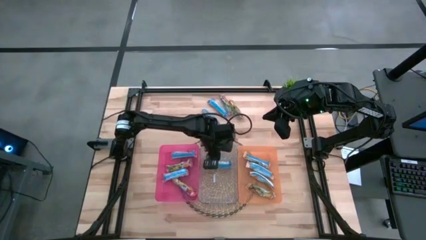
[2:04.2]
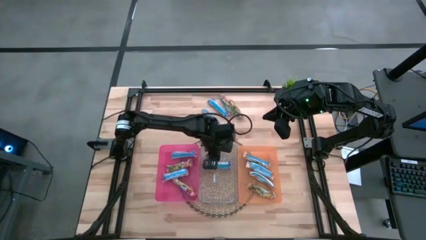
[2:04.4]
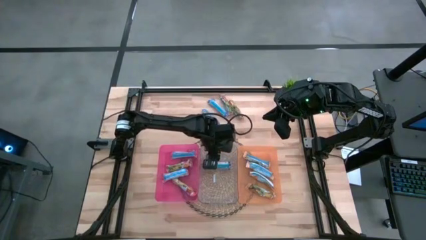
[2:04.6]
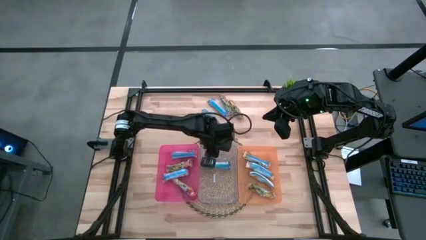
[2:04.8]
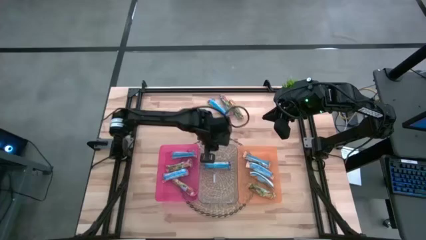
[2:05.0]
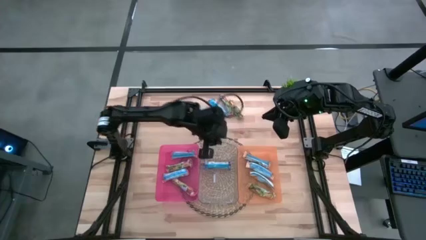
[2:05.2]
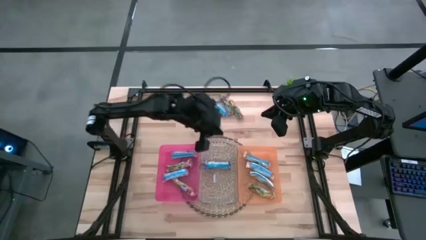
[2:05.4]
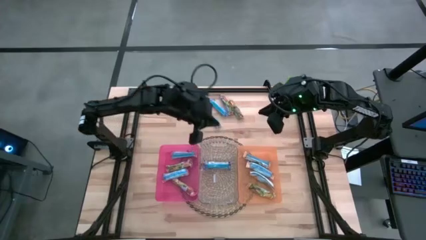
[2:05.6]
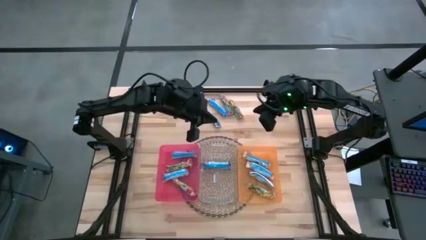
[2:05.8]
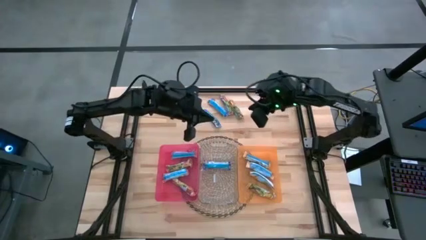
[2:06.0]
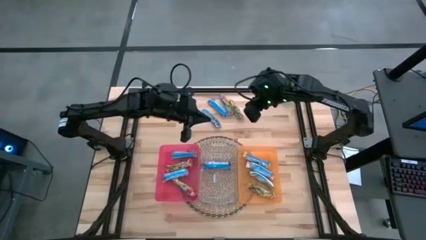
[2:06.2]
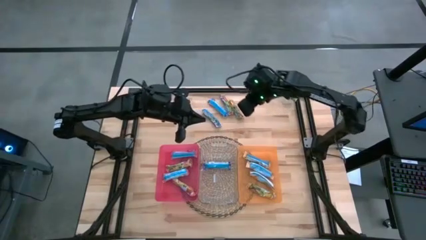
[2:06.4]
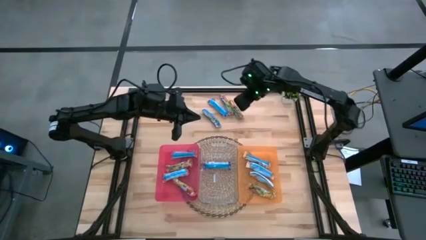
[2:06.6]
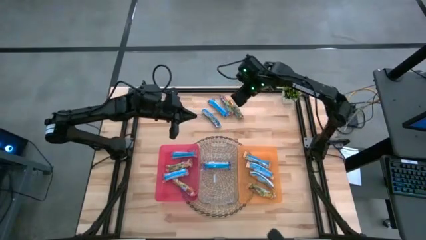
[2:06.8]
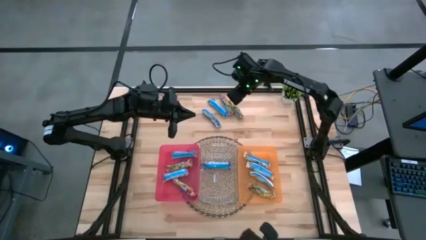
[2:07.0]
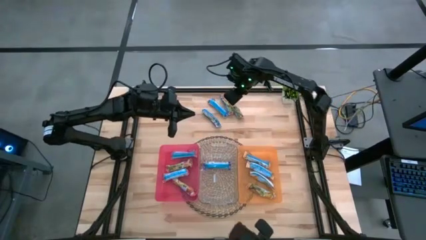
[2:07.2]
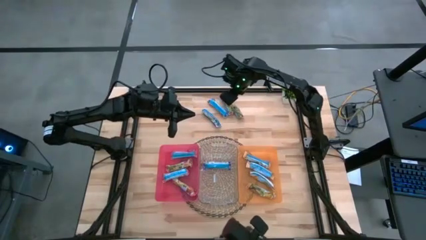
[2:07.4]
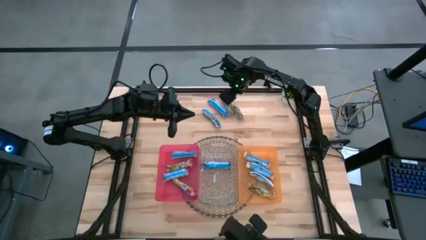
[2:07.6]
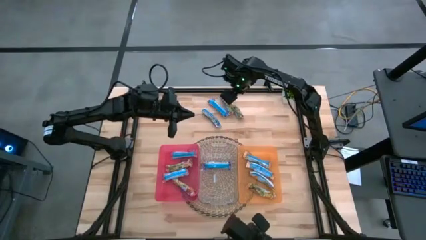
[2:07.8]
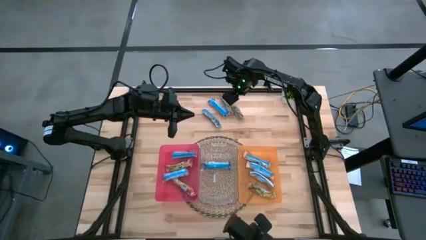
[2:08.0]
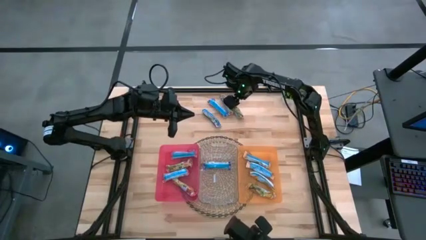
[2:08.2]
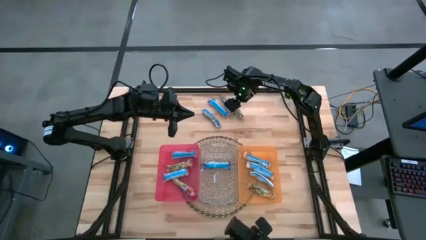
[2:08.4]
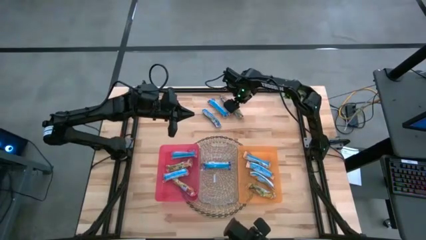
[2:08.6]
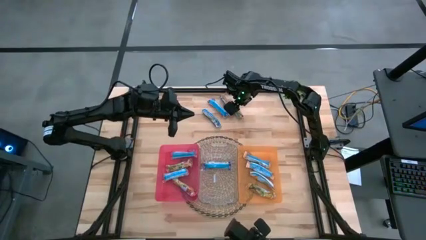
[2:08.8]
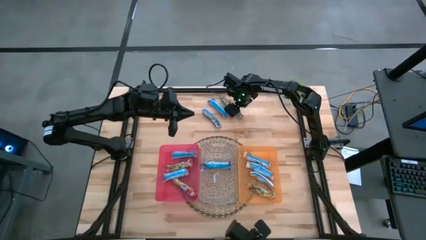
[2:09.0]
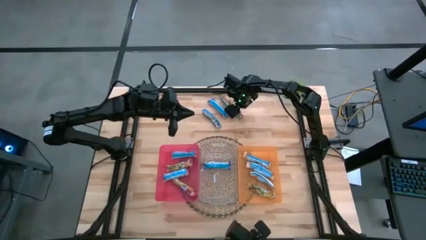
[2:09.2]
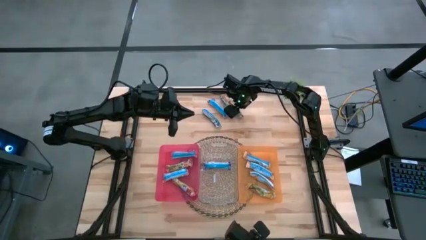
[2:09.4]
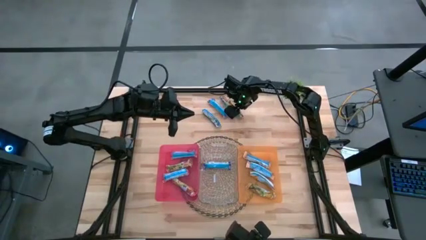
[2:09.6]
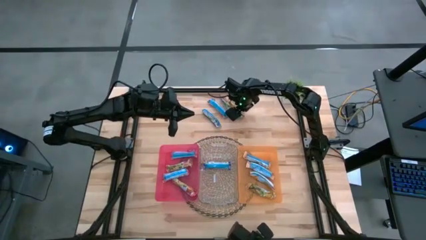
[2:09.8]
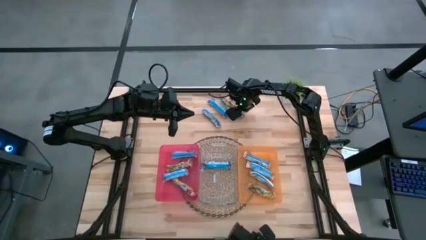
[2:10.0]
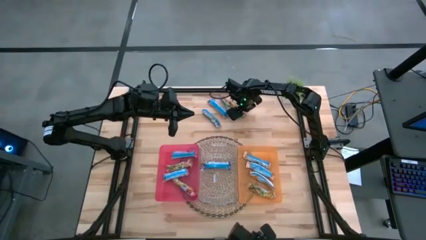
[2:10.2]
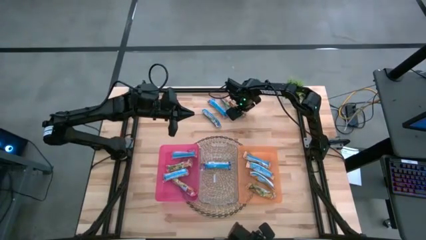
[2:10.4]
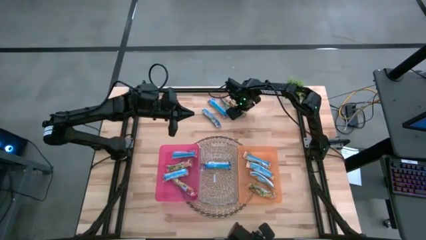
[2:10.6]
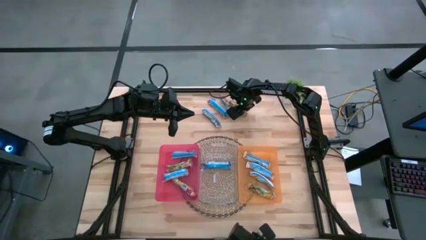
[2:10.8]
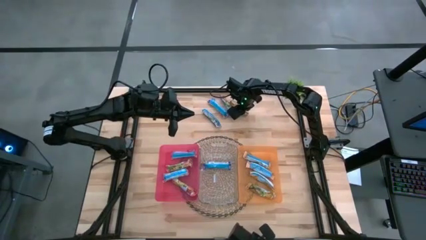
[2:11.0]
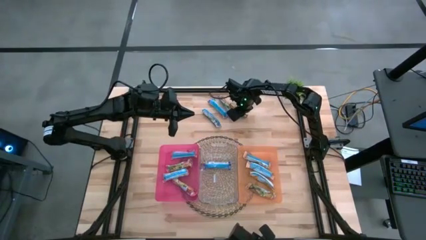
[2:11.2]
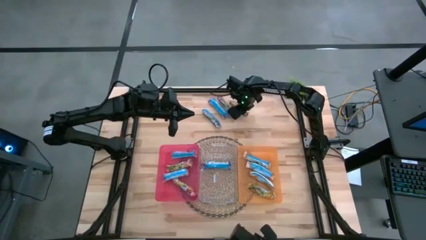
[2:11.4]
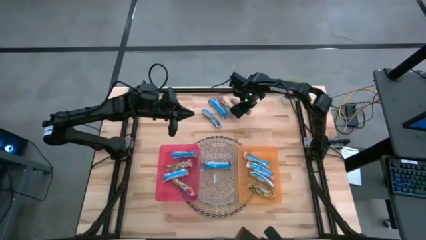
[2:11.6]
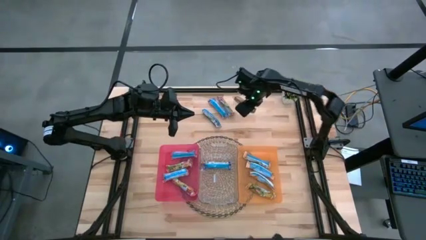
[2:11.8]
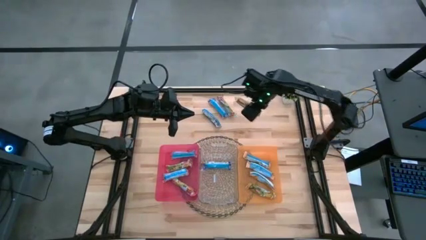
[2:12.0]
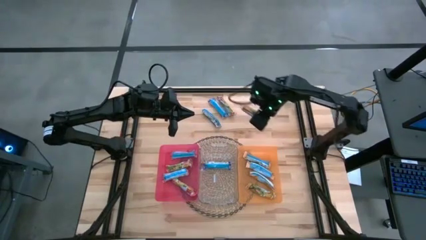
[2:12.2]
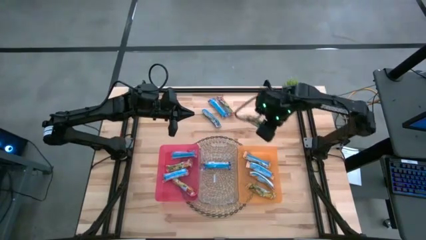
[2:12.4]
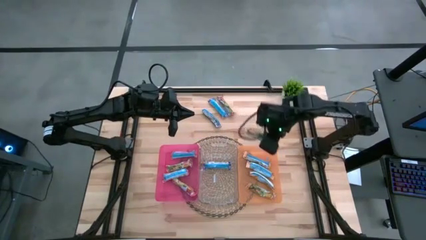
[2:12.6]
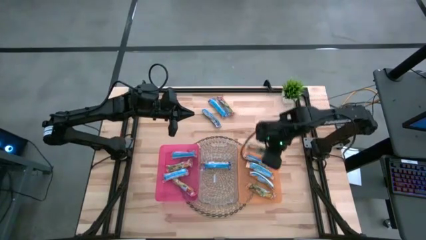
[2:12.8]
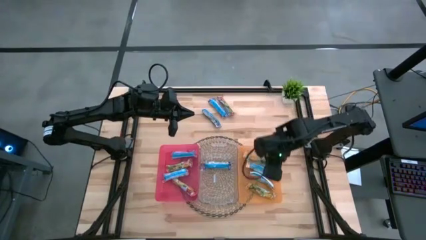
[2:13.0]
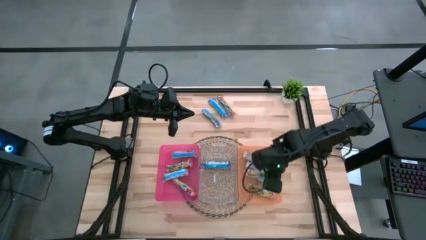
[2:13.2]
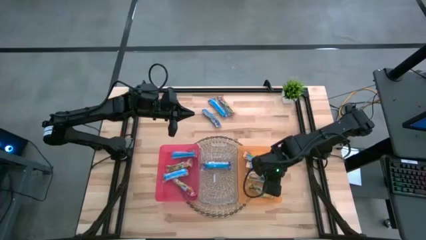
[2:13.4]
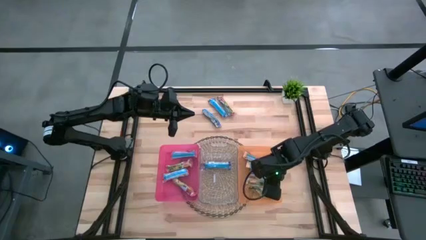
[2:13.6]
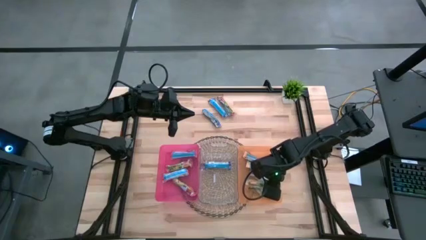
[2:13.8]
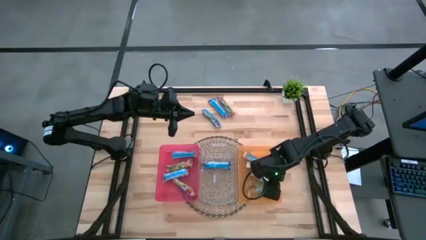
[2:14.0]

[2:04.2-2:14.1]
Task: Pick and place Granola Bars by type
Put the yellow granola bar into the orange bin

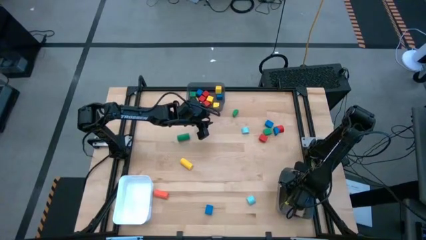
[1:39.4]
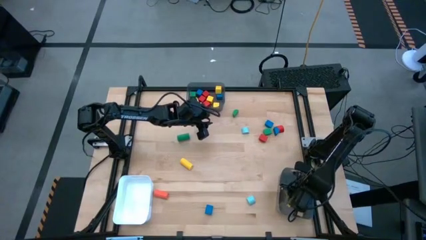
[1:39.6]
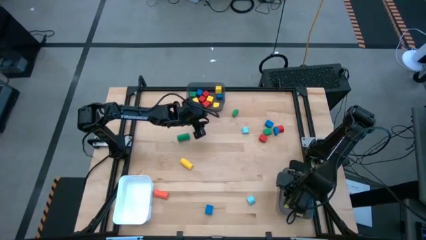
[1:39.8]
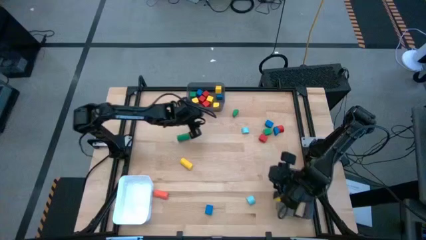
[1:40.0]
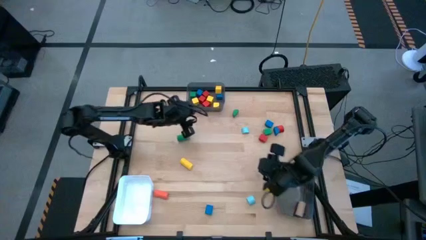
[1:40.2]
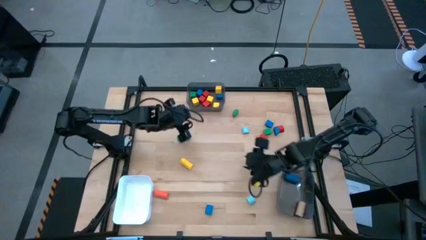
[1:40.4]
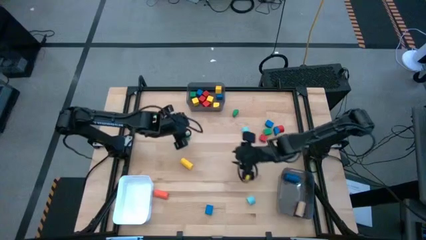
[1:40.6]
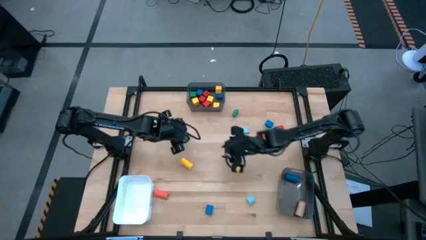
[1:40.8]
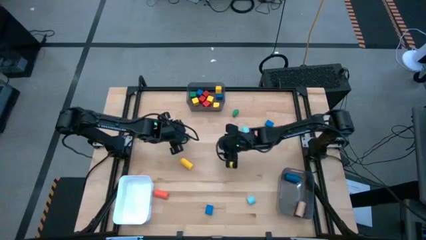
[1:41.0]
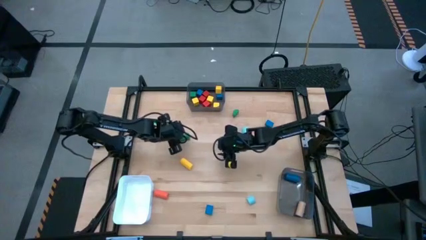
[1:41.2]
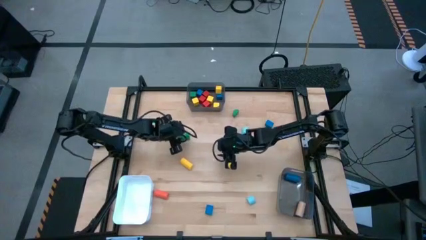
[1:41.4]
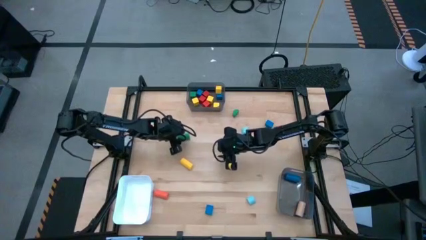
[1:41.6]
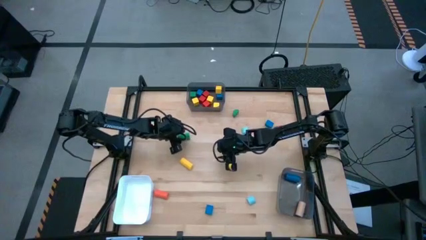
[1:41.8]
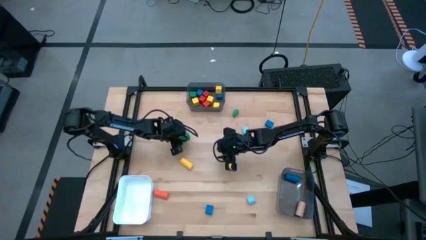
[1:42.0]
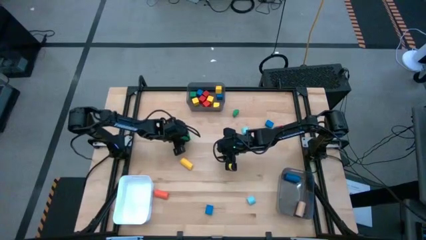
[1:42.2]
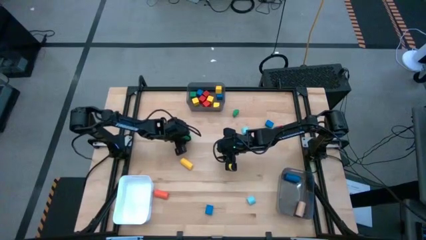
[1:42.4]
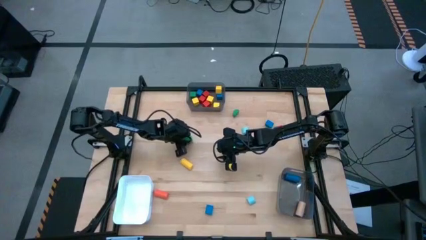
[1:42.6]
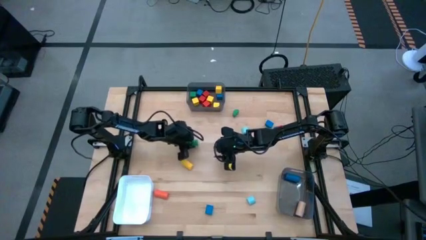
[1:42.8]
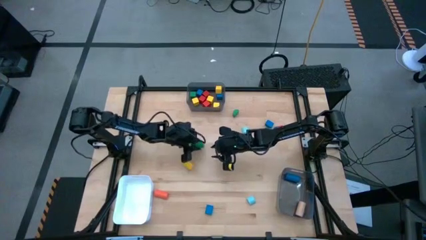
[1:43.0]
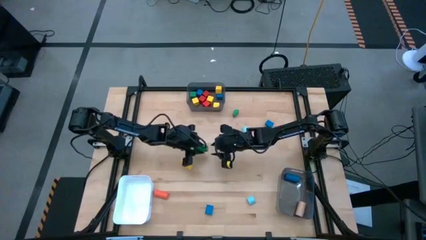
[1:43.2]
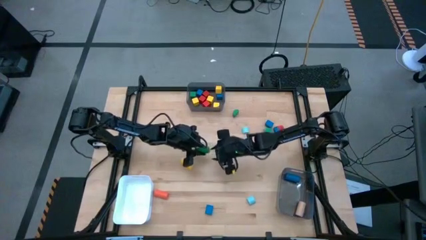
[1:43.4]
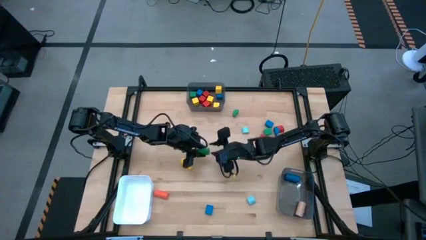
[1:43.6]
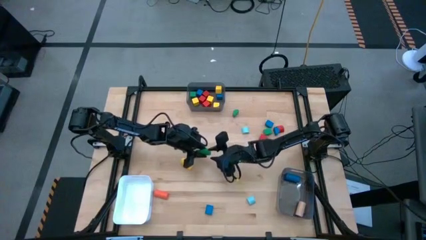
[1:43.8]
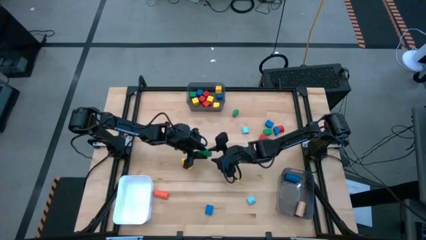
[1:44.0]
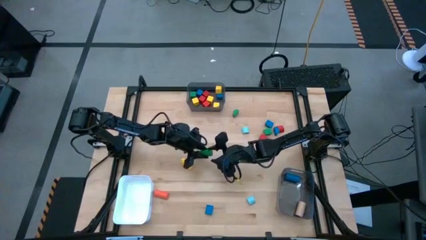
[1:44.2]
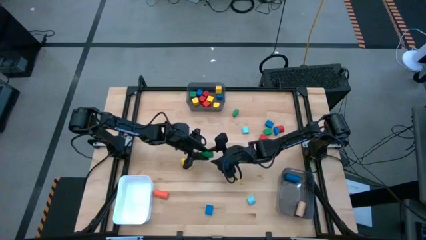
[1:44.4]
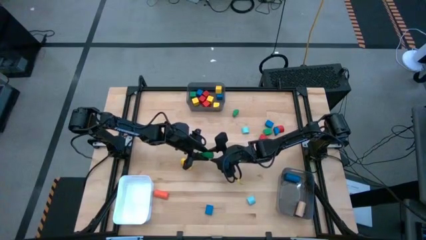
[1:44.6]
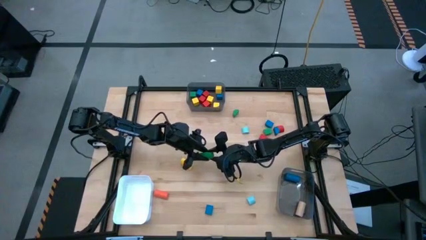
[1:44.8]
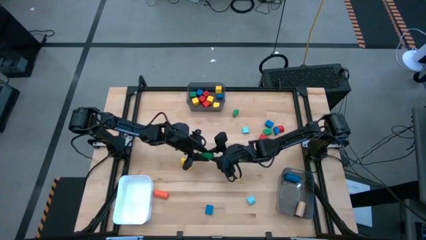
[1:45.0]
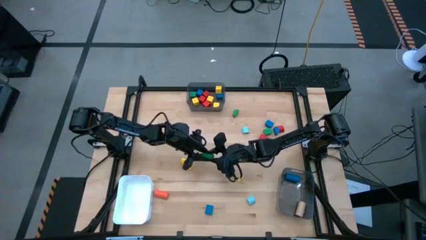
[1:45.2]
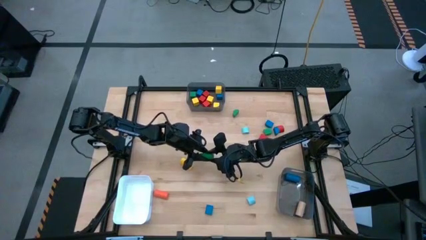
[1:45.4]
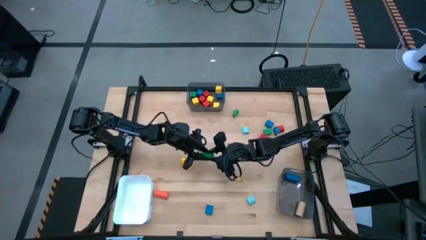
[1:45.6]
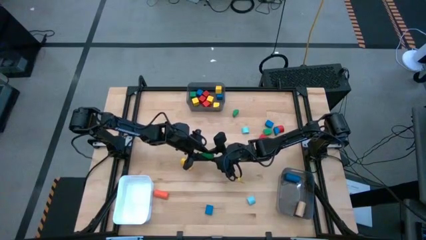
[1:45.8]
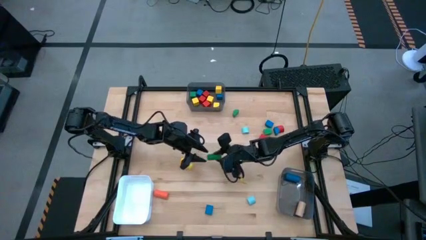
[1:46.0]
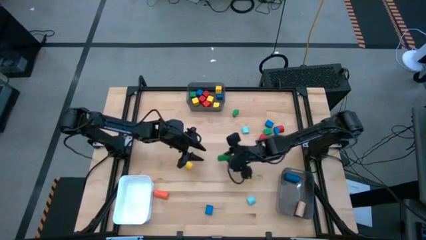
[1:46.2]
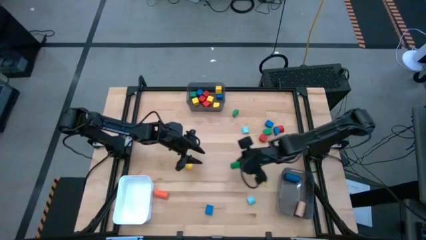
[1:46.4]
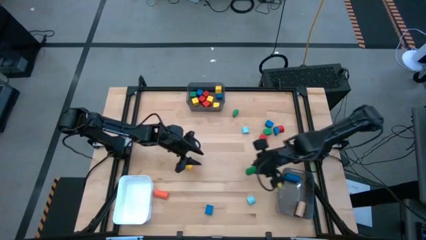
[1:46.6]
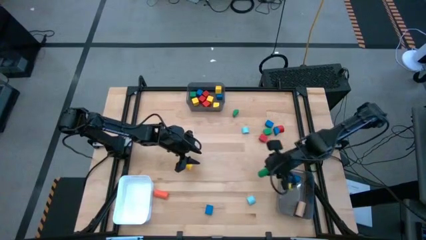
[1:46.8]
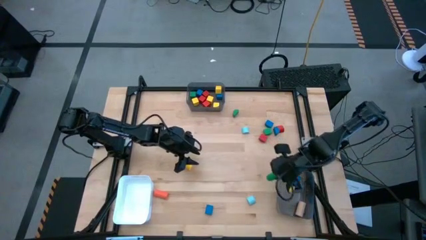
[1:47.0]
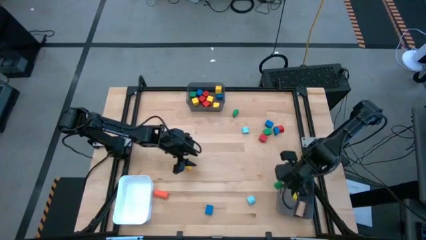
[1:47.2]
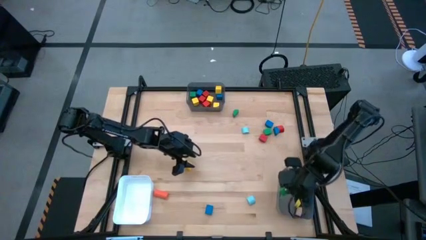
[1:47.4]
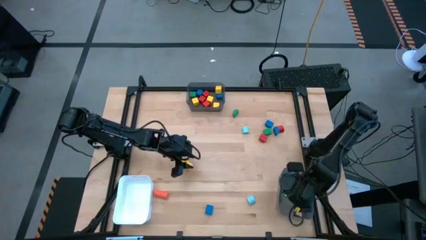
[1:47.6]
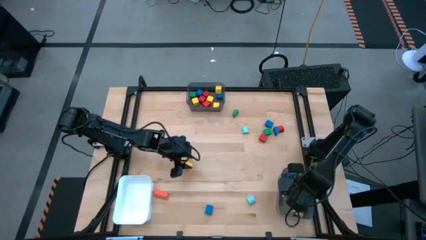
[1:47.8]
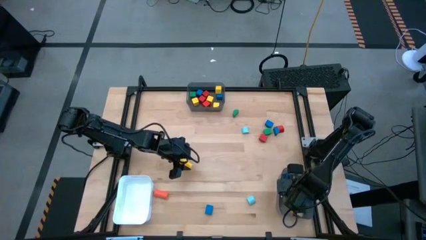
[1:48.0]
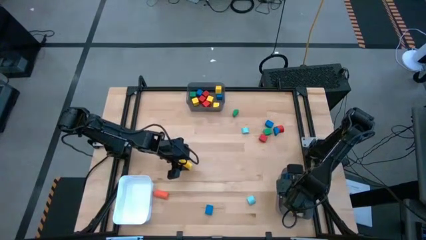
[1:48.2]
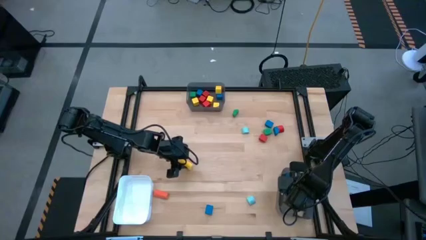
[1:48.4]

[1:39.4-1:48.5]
Task: Sort blocks by size
Put the green cylindrical block into the bottom black bin
